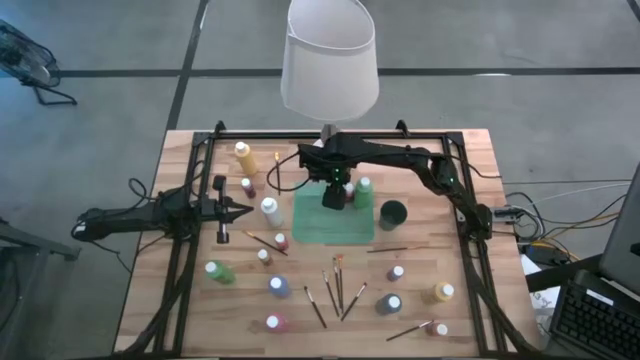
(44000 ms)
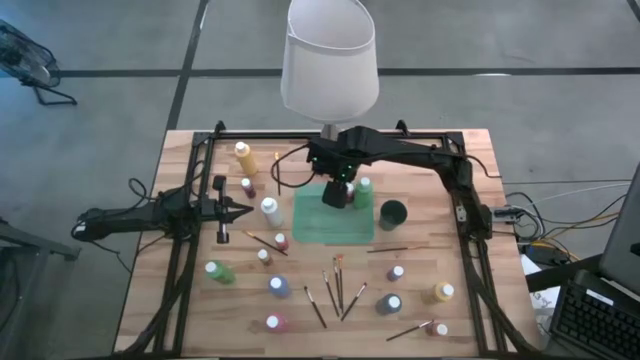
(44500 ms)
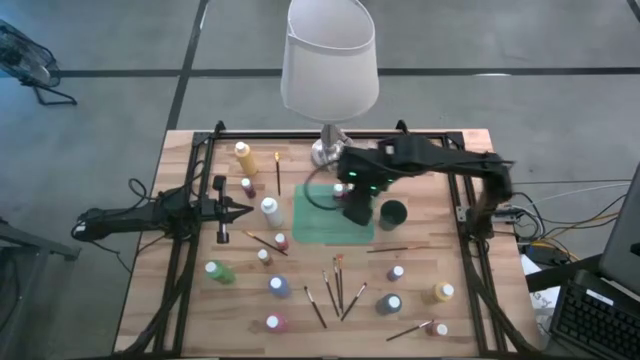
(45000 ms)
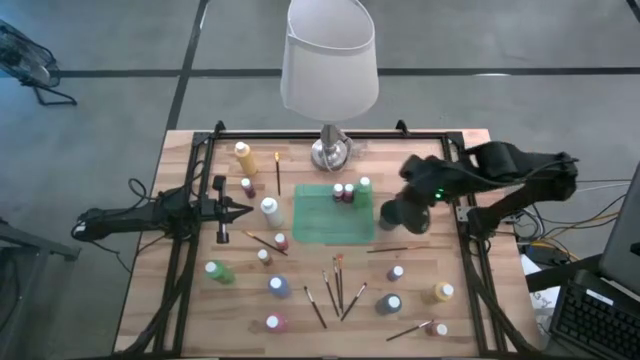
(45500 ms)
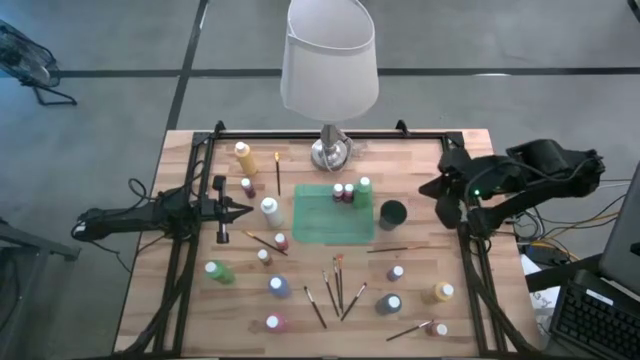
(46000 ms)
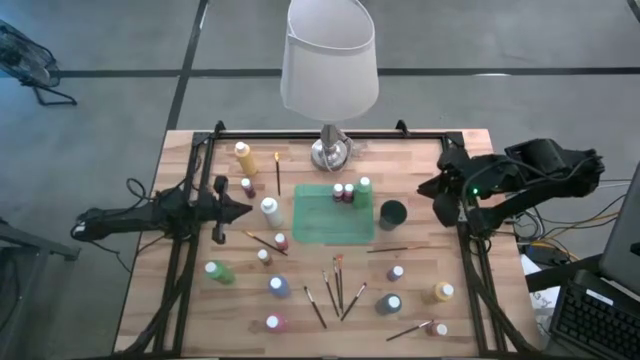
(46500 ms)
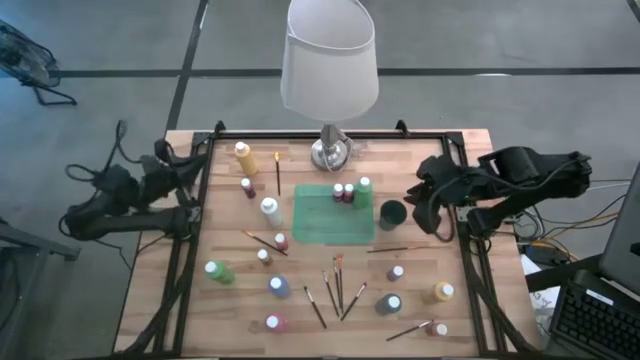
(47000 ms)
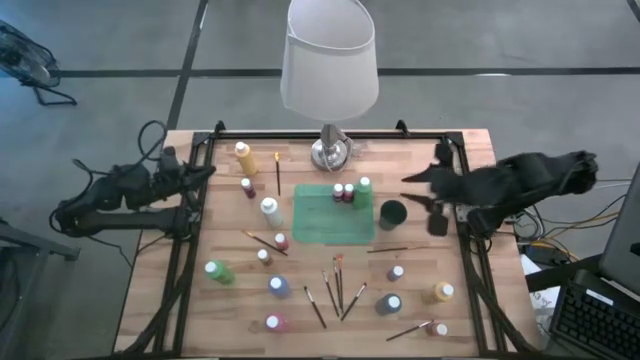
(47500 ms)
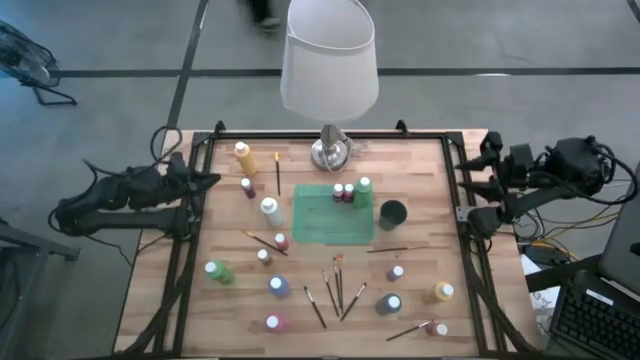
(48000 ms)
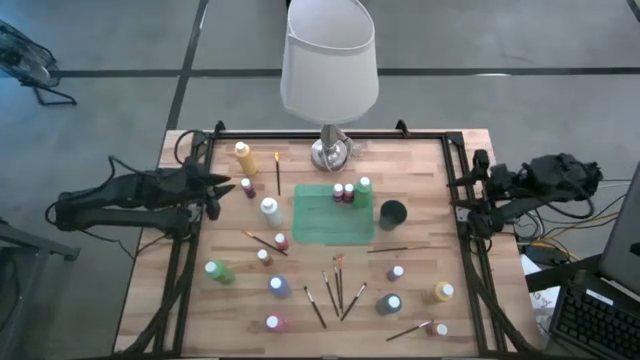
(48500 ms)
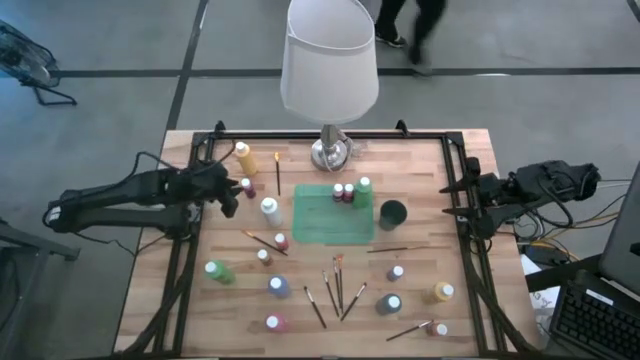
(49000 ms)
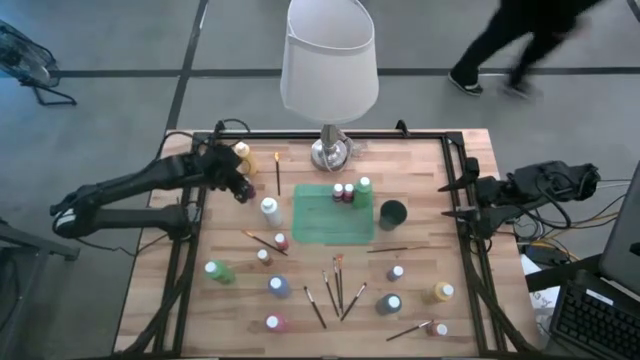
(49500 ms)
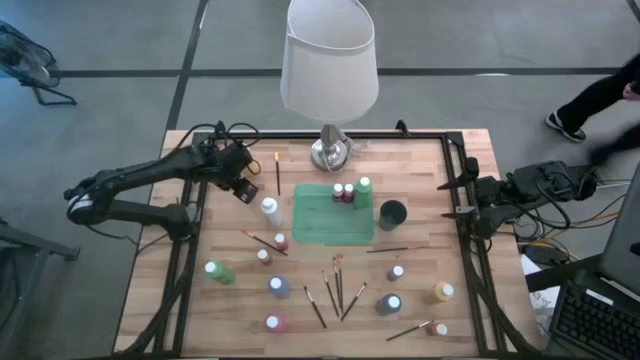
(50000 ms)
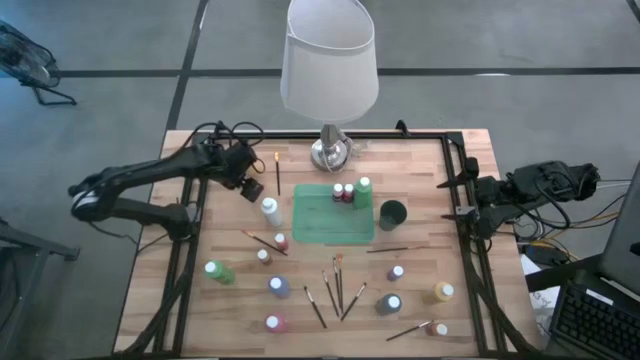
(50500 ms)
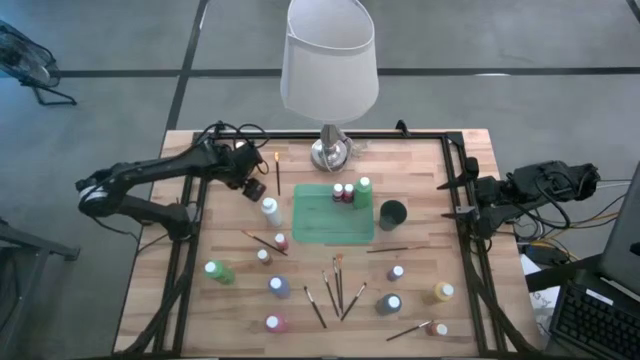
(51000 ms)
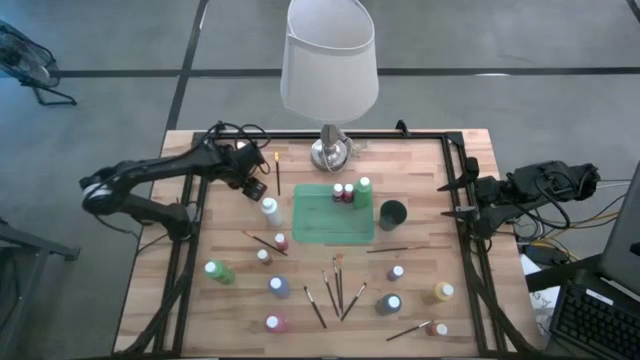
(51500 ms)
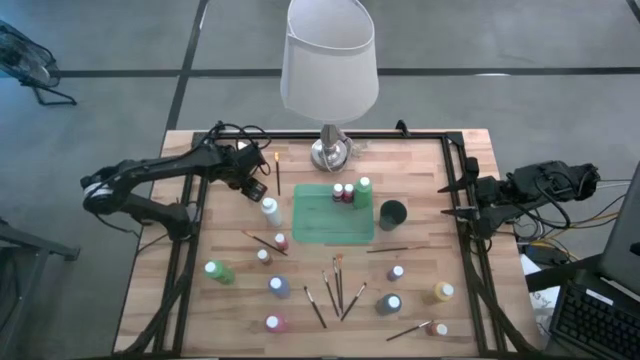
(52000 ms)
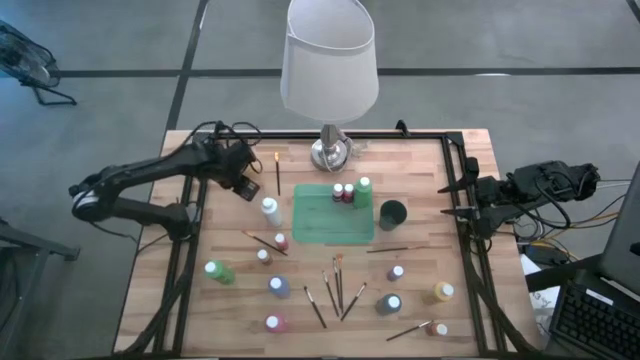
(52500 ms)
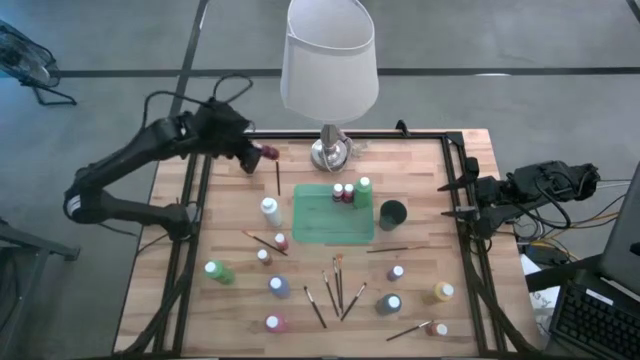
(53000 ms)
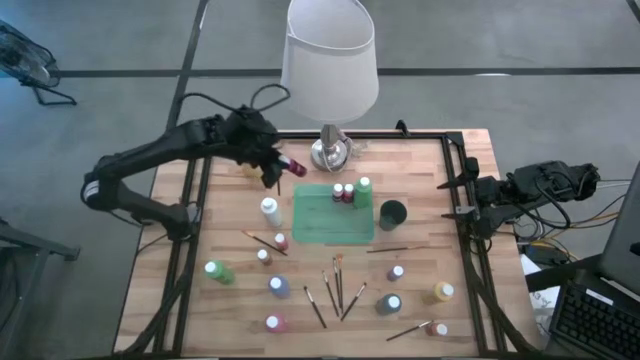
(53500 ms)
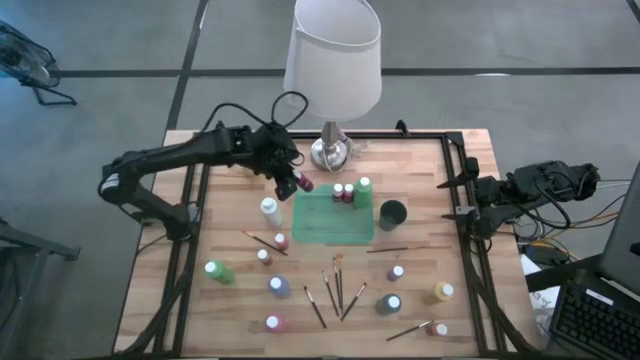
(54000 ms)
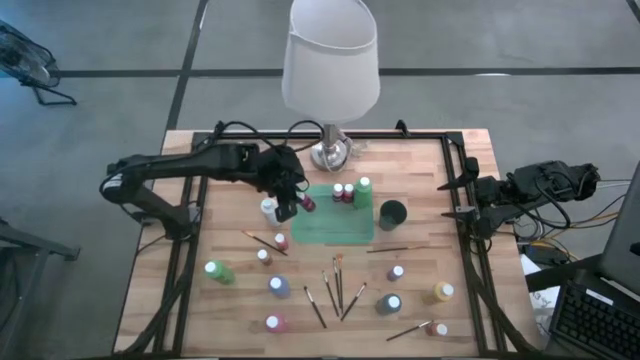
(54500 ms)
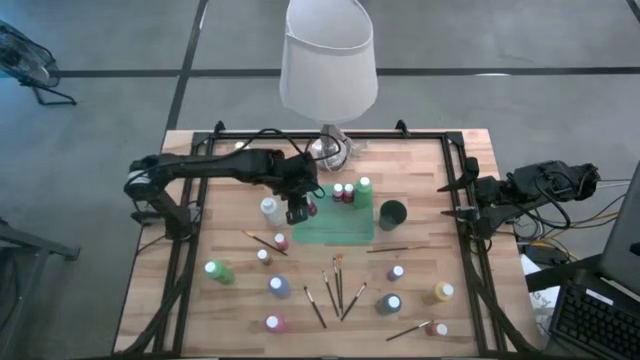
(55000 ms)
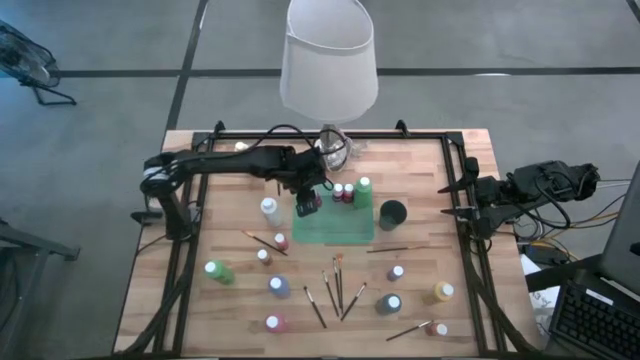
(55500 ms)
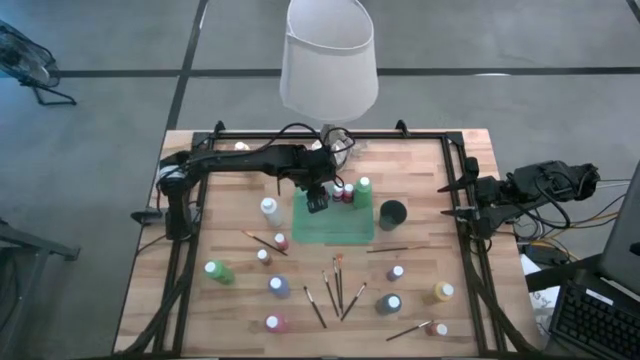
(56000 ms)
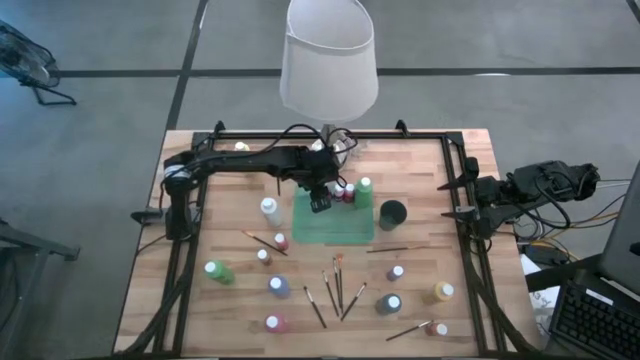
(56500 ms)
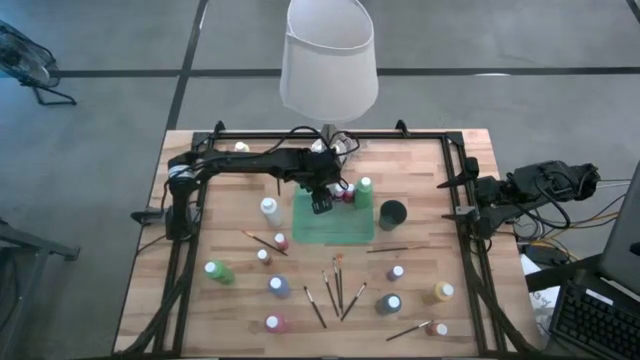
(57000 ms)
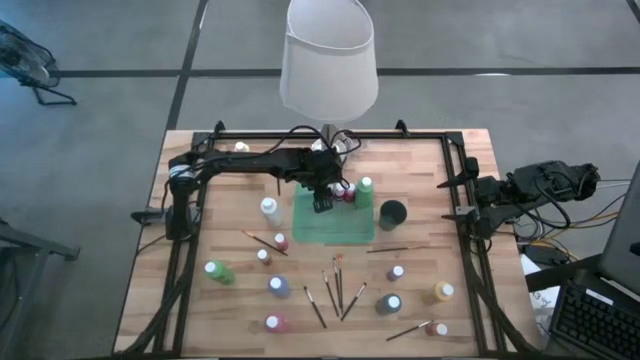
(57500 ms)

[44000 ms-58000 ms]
Task: Pick & Place Paint Supplies
Put the red paint bottle into the green bin

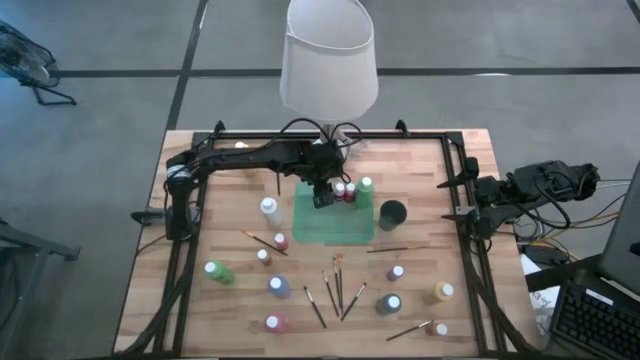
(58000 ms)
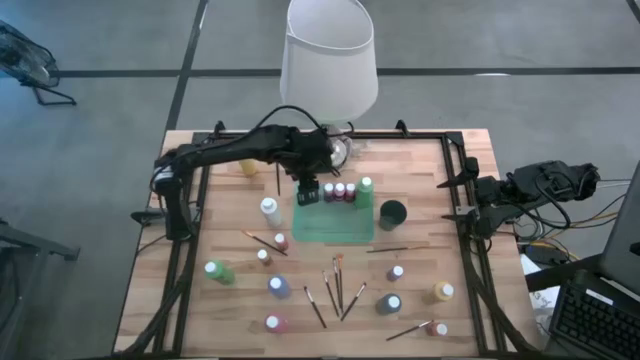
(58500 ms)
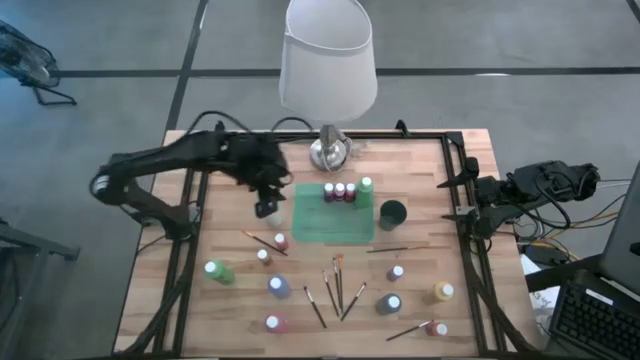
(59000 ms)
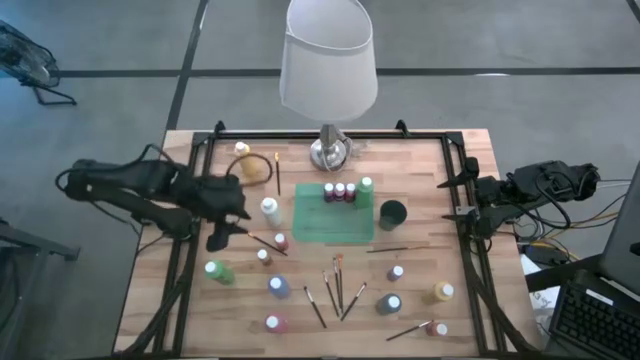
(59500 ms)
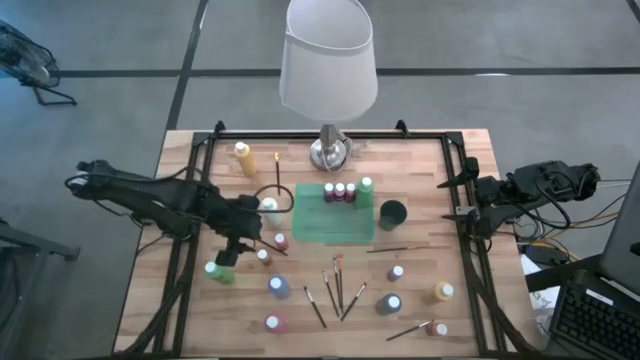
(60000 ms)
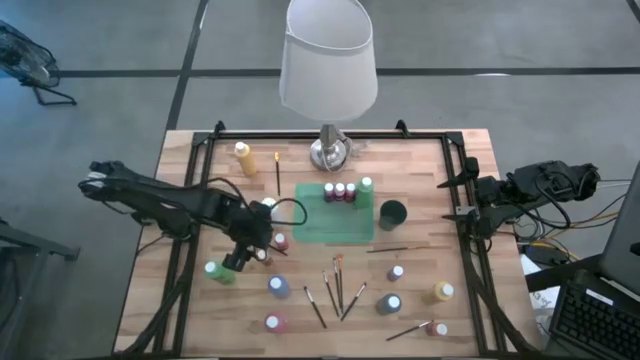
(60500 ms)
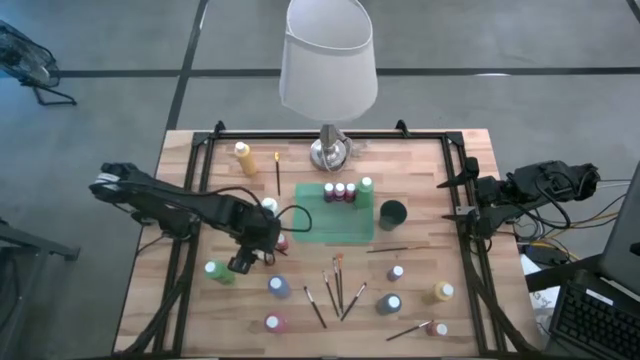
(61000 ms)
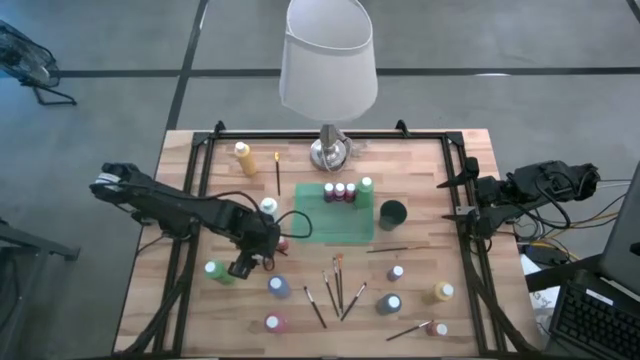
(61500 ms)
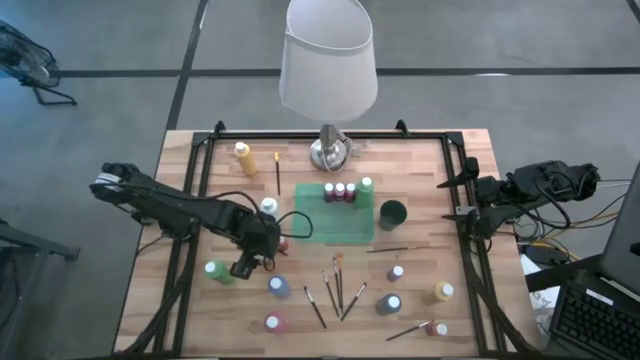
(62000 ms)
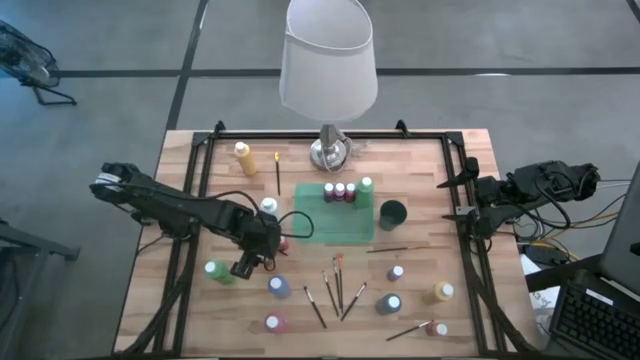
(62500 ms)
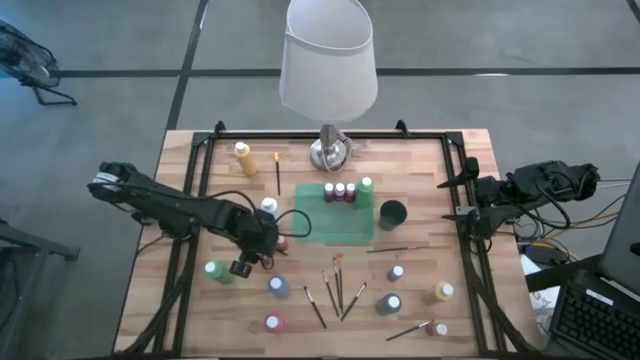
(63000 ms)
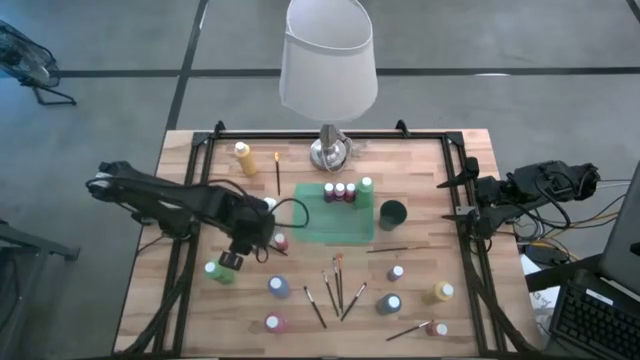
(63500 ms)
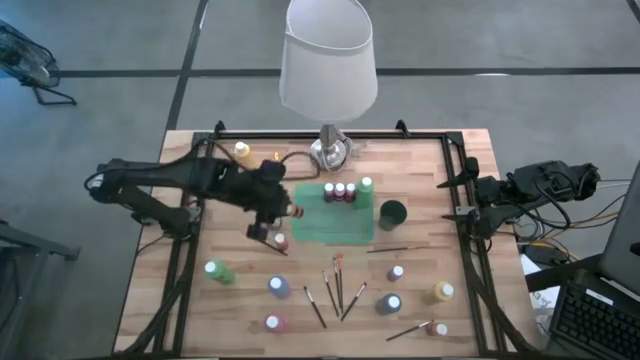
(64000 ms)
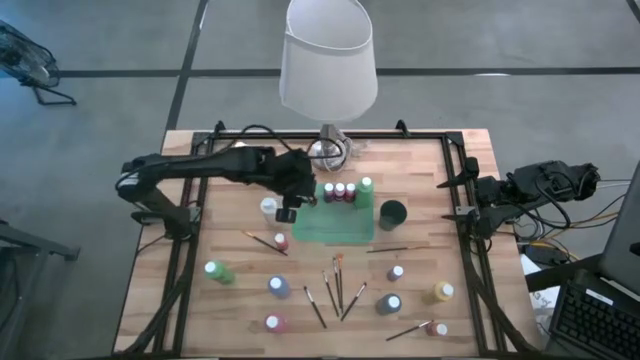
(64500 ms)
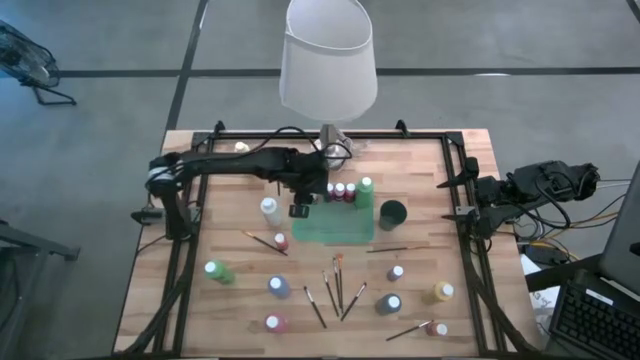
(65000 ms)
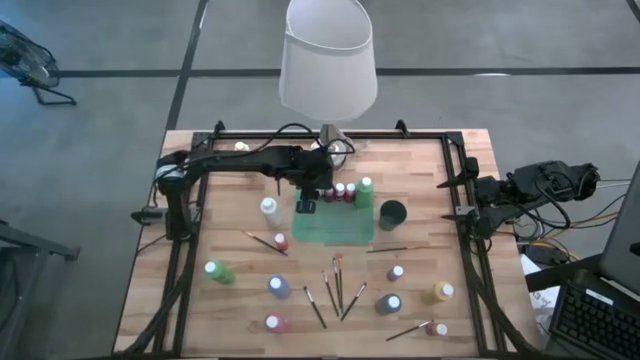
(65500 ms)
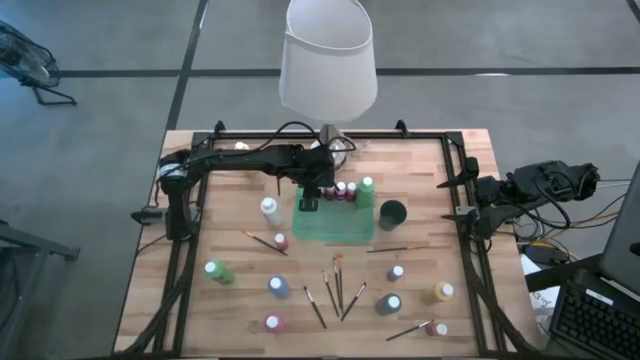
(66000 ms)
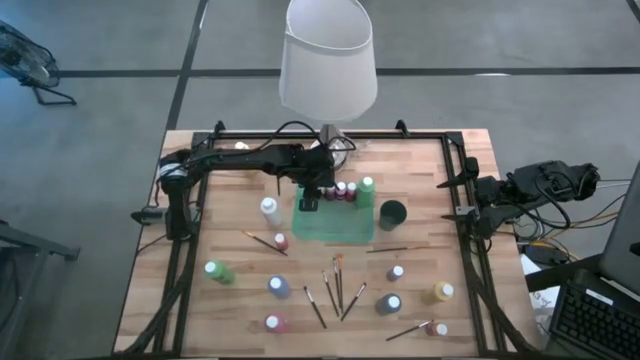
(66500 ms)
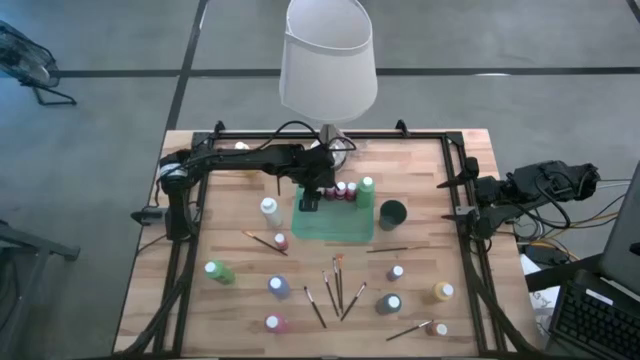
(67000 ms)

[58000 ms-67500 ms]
Put the yellow paint bottle into the green bin
